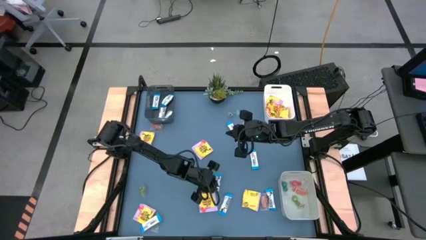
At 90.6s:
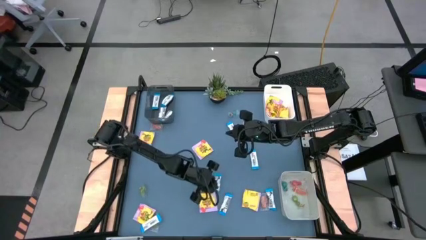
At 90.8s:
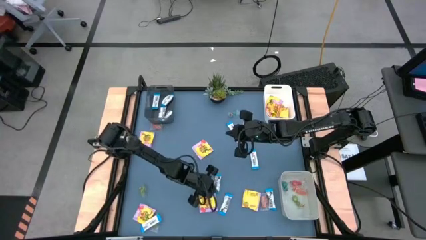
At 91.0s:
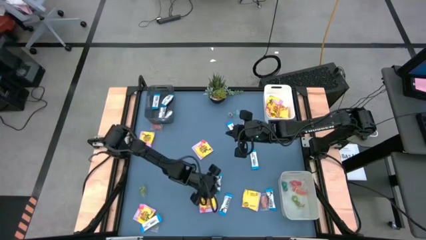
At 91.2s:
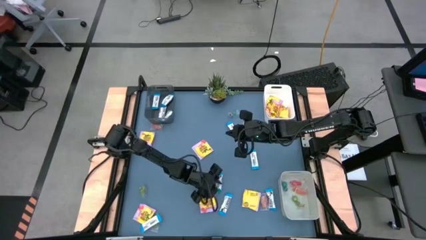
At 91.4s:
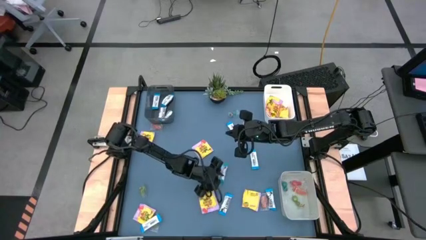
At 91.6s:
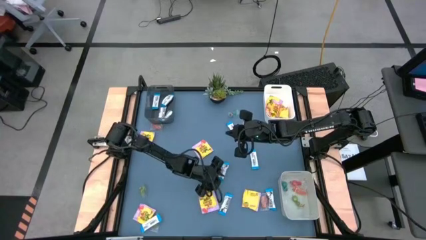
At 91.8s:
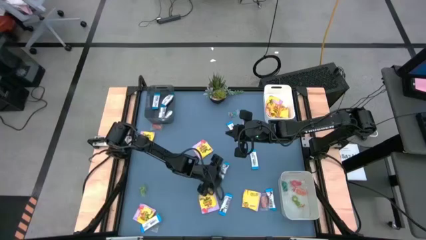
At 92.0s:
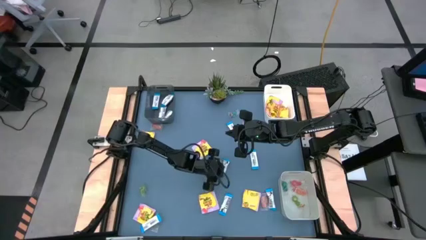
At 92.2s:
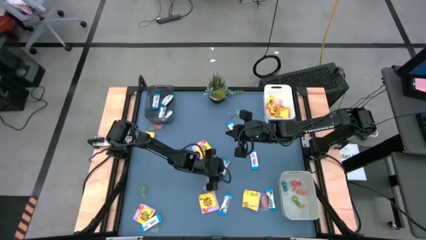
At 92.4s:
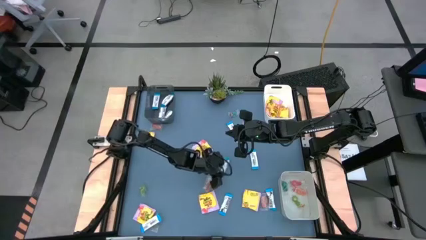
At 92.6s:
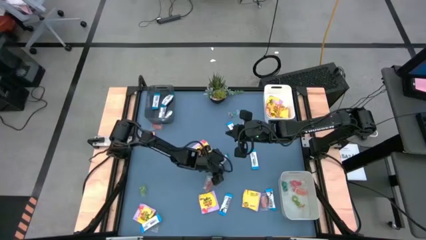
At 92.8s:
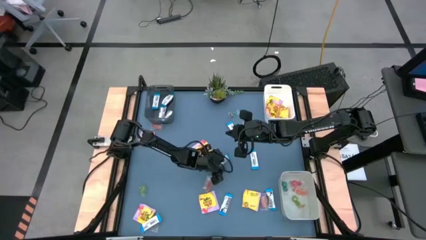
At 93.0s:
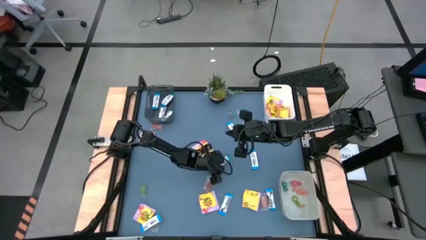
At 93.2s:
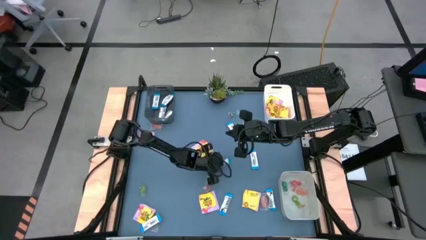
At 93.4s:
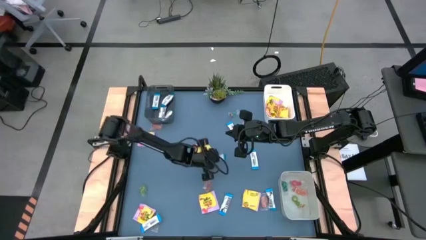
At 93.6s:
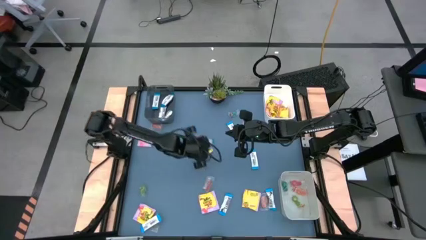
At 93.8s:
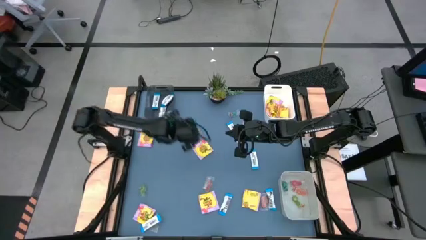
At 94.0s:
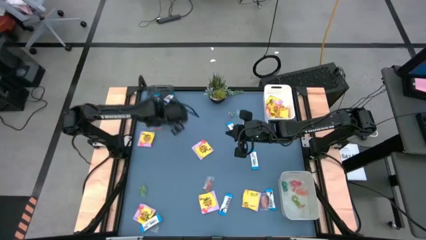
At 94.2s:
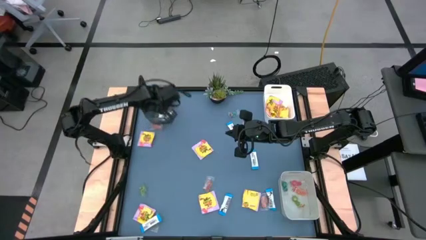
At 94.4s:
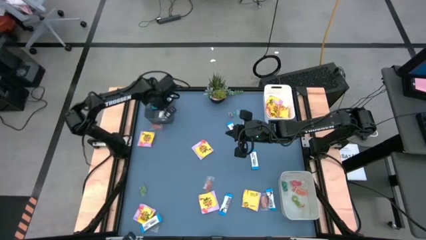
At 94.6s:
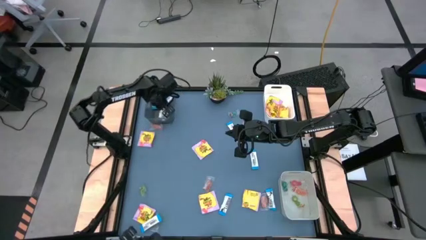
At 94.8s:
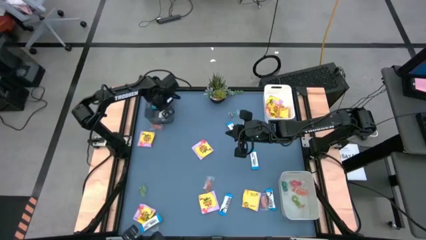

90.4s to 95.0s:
Task: Sort candy
Put the middle bottom white chocolate bar into the transparent black bin

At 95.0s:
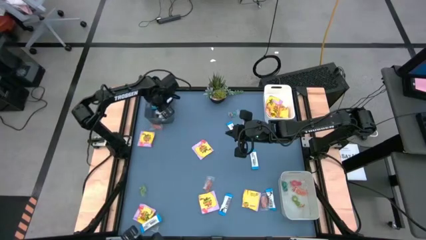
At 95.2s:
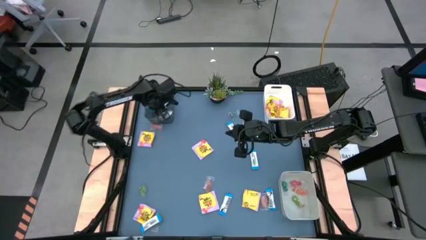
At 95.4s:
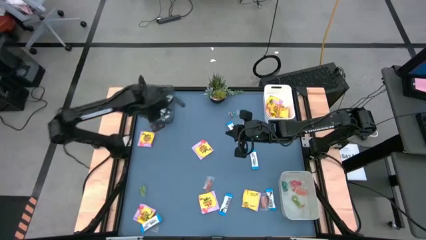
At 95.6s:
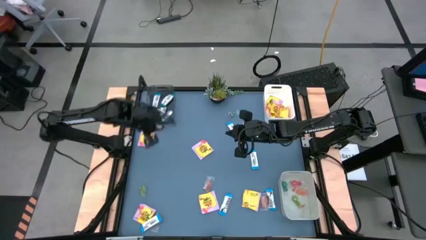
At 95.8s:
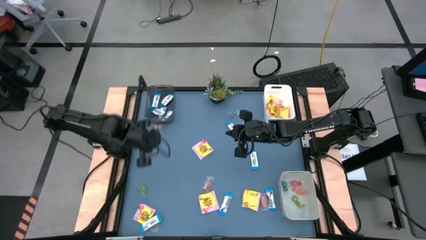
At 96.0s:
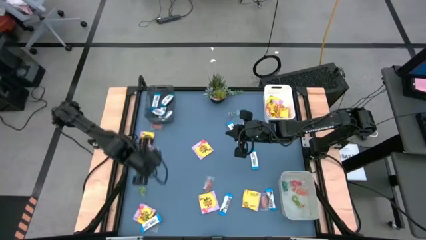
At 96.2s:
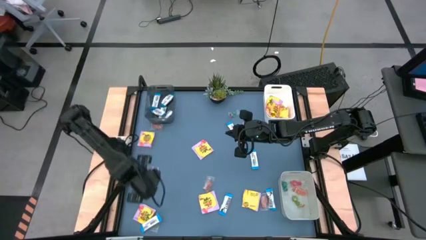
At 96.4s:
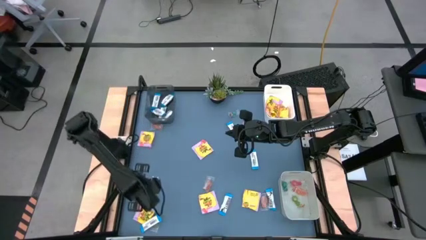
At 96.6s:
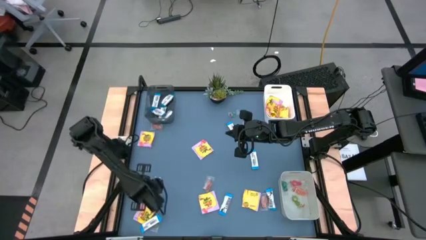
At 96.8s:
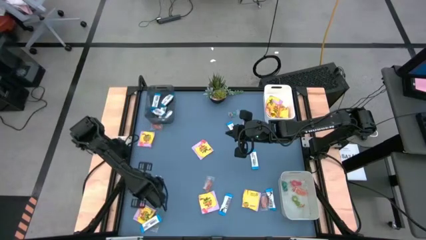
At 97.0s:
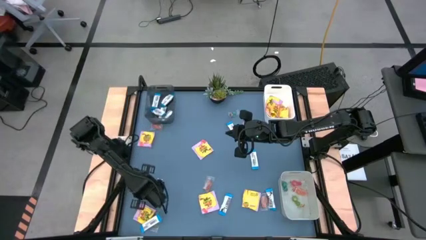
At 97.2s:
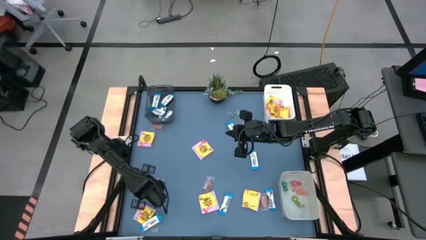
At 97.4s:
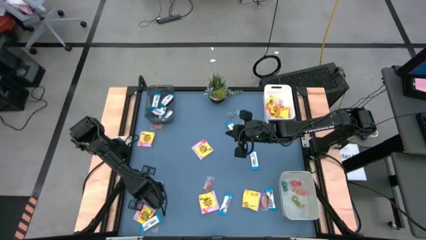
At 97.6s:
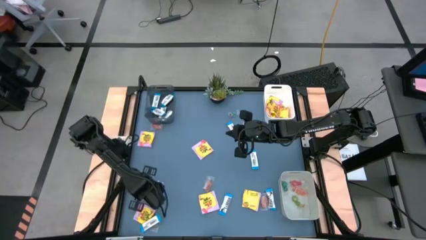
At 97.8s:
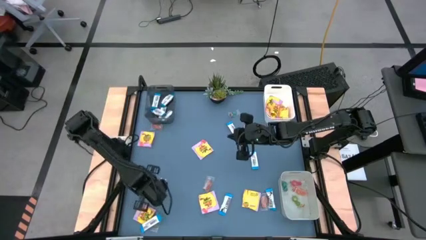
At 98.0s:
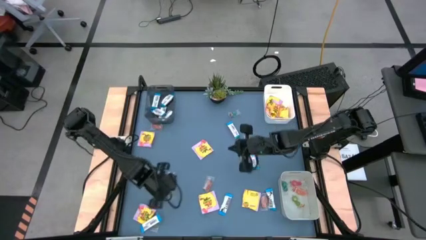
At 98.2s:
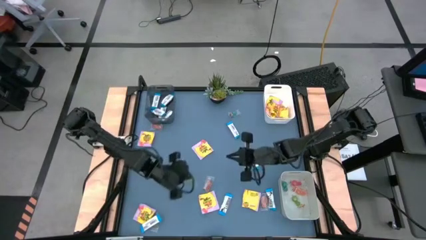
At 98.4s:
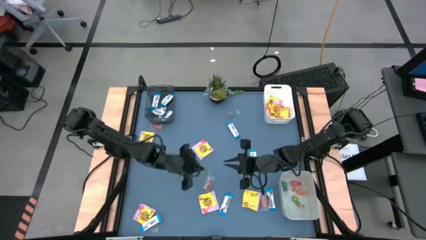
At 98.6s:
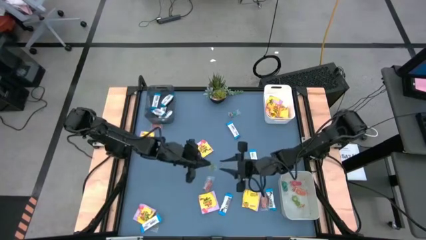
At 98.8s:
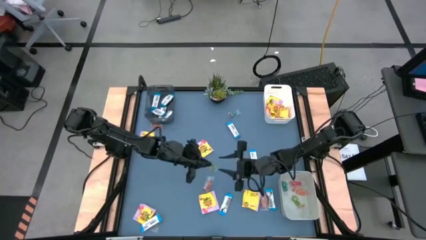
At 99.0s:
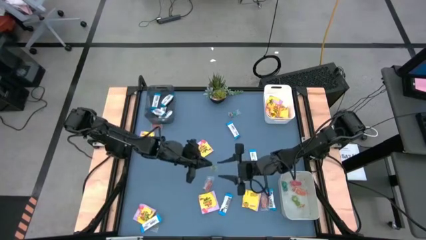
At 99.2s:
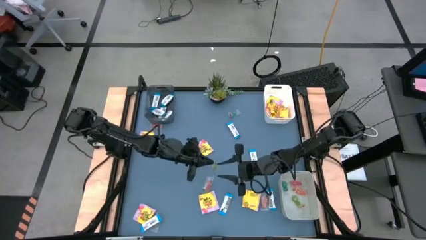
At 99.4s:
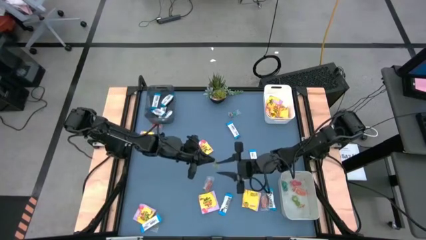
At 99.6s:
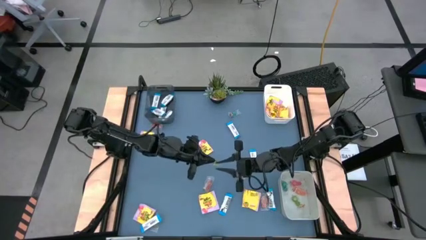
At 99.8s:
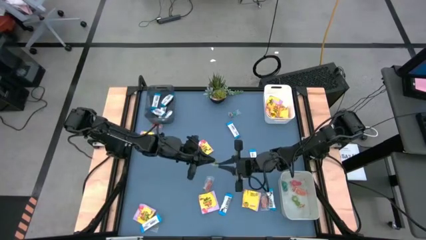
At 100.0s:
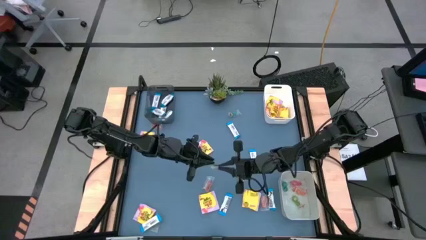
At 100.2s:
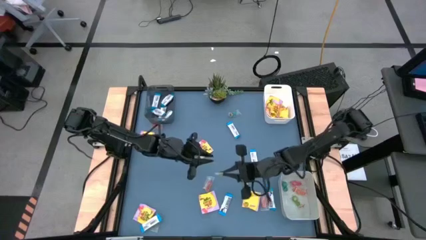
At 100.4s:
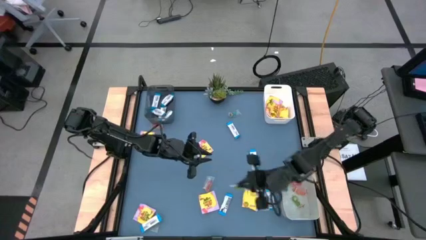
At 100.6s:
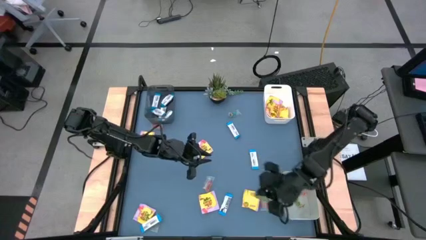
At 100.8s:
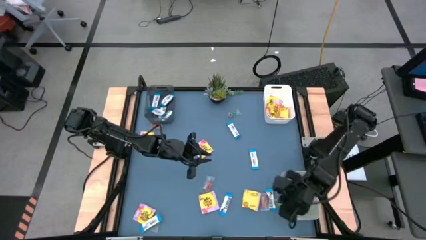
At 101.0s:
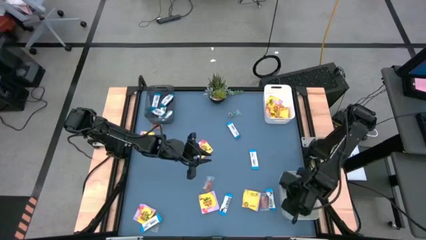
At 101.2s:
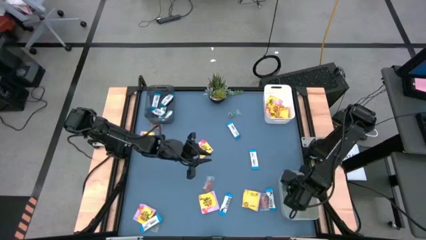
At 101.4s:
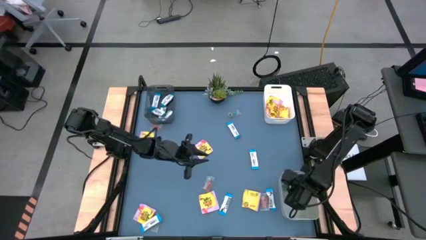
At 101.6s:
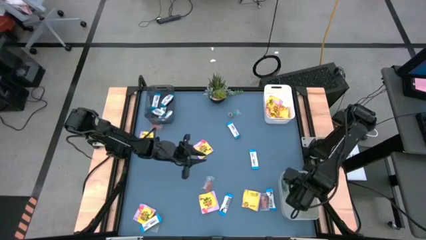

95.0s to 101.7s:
Put the bottom light-green gummy candy into the grey bin

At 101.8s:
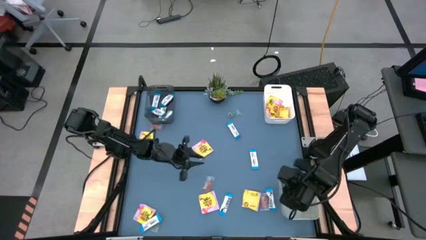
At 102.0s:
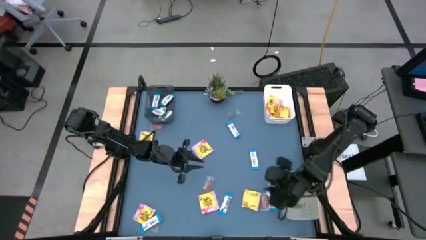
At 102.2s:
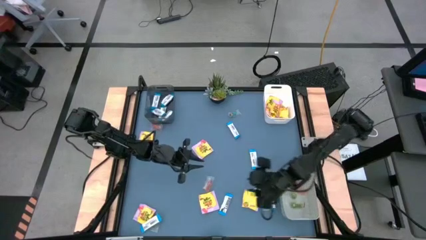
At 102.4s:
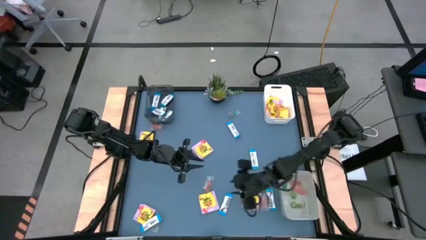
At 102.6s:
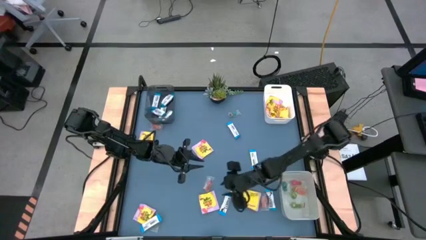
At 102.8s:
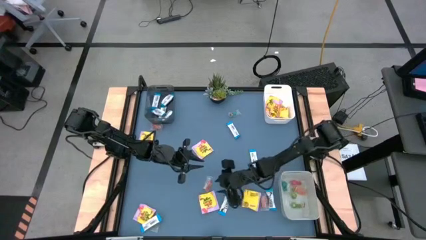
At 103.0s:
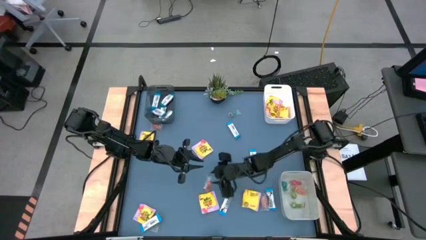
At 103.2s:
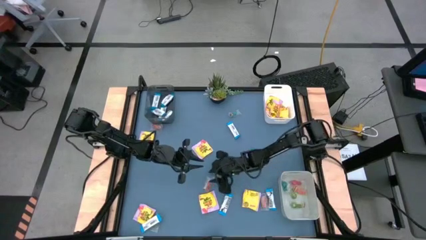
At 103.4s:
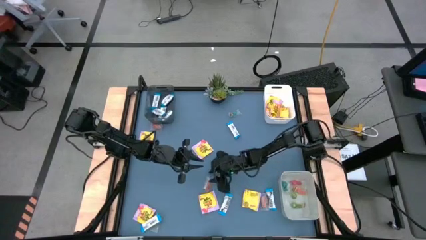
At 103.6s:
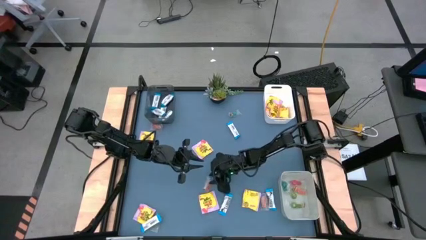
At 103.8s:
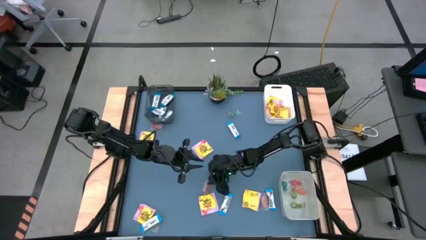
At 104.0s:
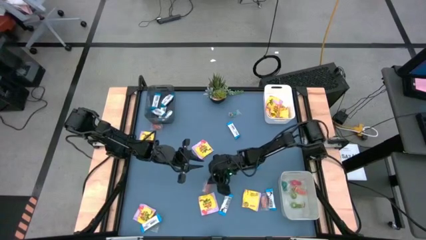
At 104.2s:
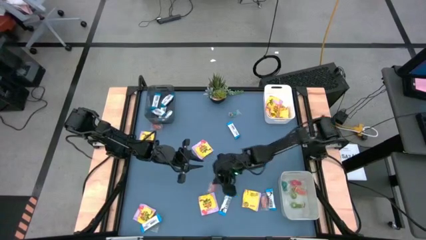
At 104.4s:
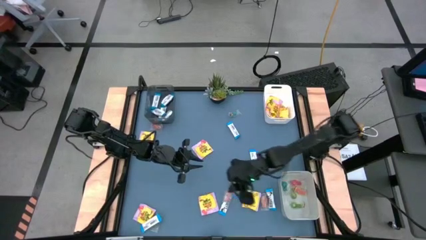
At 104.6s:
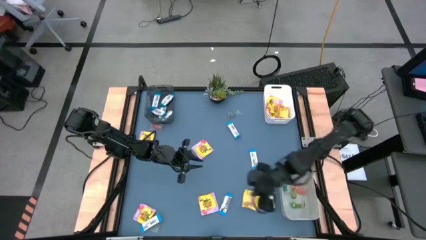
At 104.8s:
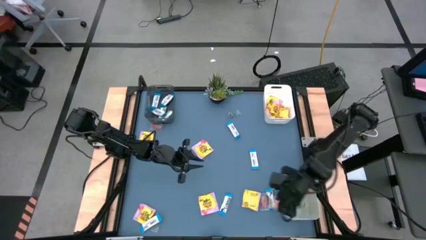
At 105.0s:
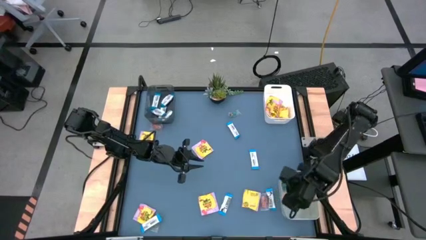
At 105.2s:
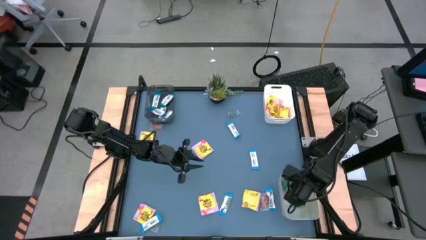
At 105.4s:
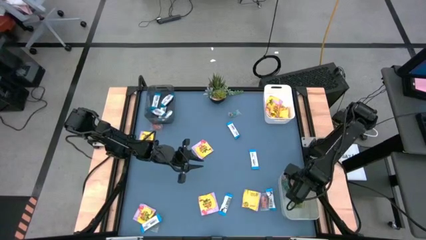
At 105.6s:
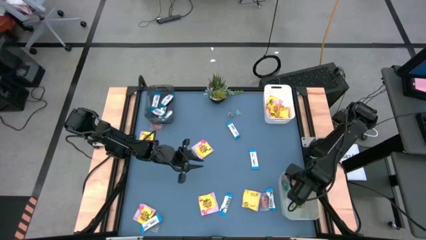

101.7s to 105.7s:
Put the middle orange gummy candy into the grey bin

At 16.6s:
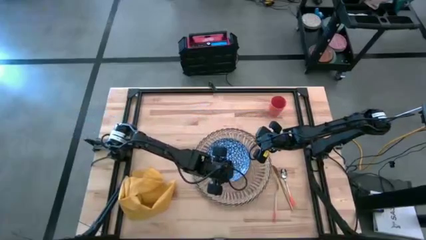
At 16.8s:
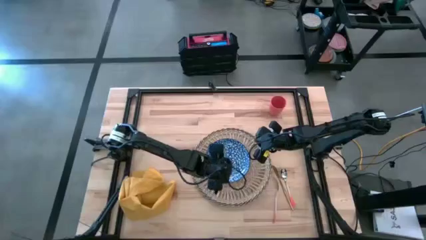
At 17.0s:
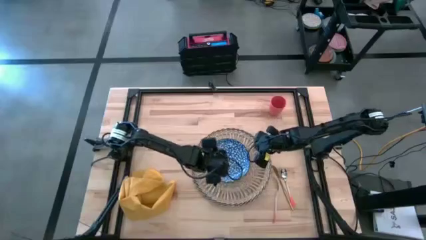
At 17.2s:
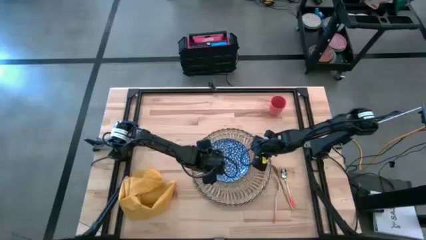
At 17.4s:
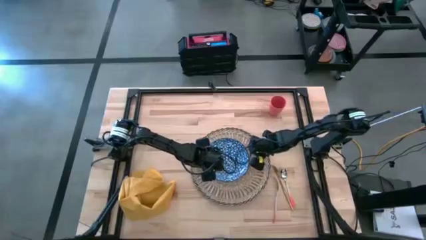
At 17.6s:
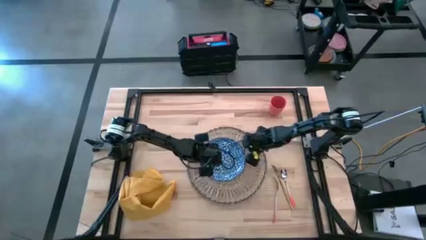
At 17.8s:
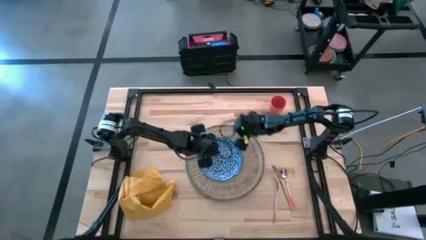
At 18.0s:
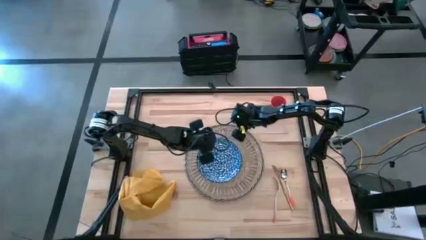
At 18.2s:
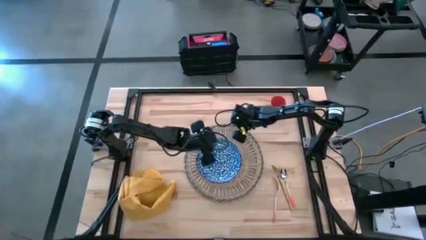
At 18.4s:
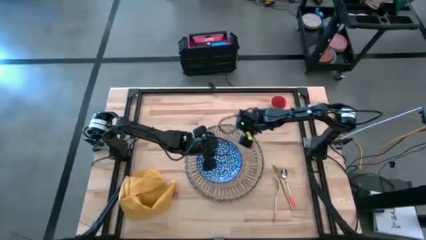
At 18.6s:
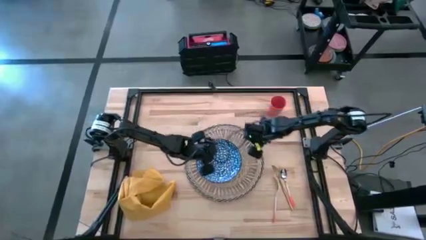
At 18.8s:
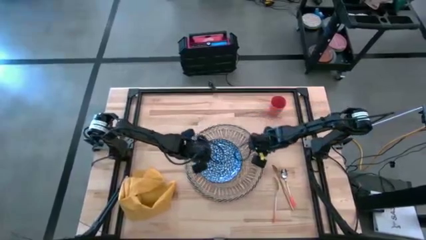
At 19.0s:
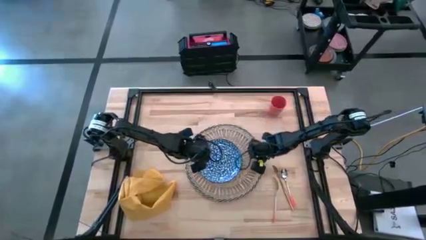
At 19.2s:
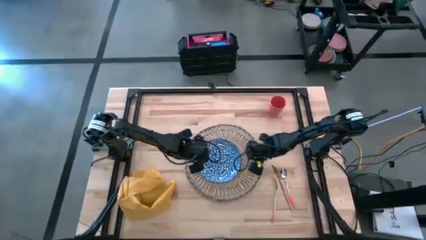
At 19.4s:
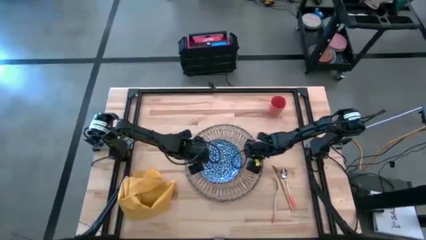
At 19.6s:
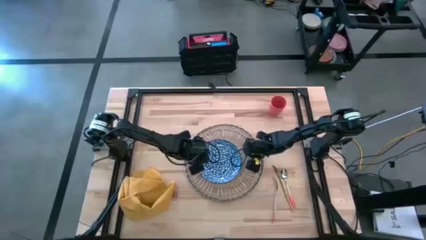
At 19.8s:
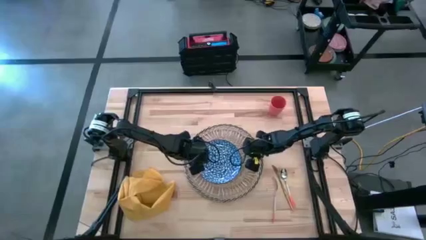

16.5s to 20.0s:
Task: Set table place
Move the brown placemat to the center of the table
